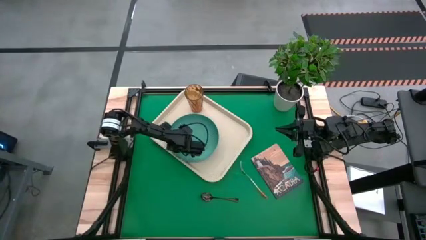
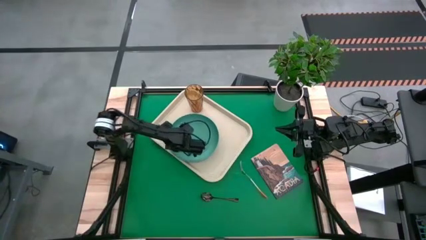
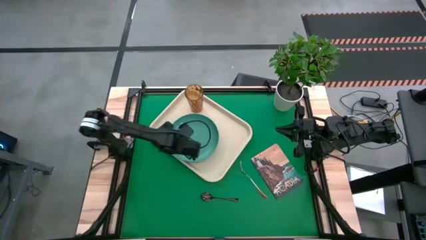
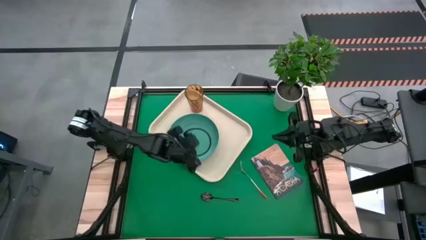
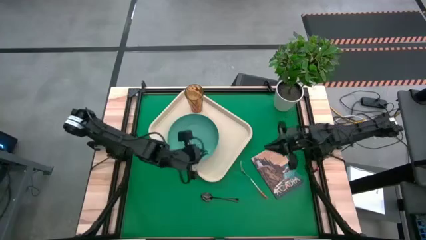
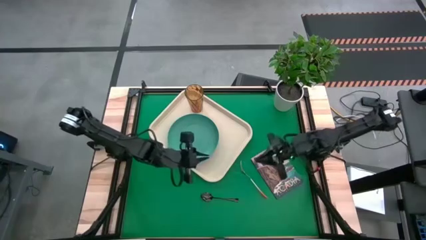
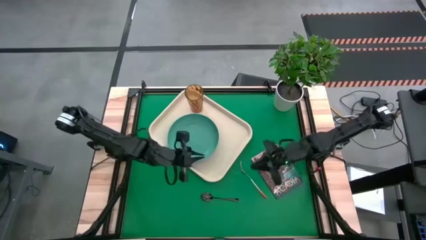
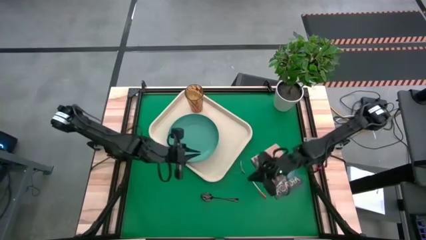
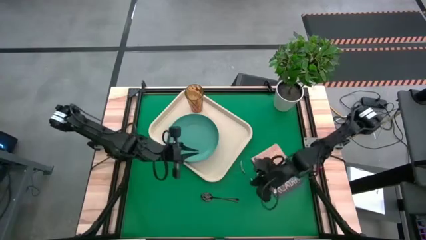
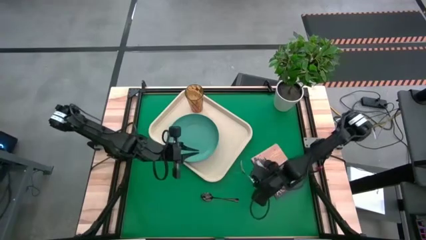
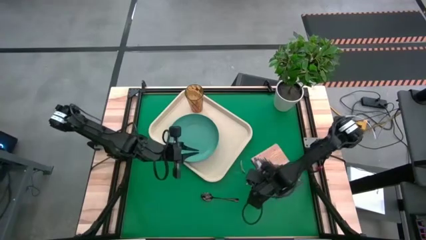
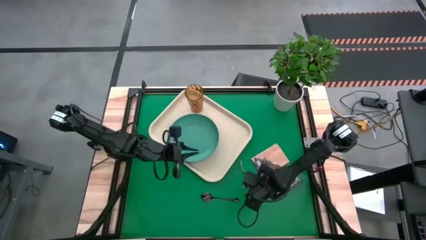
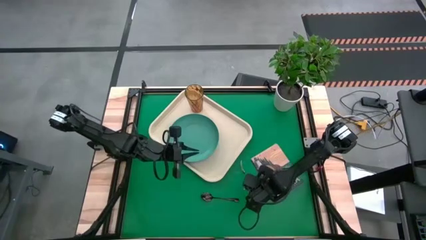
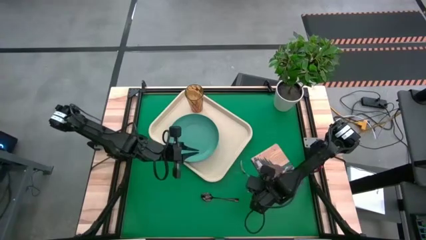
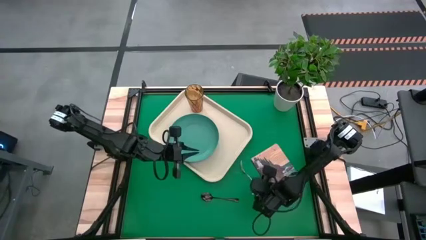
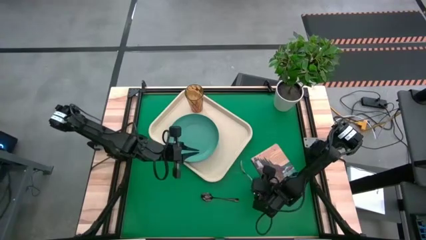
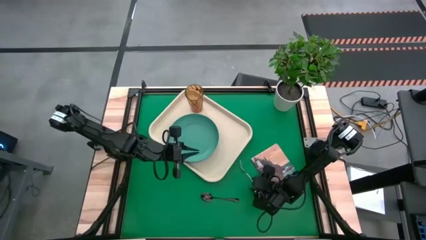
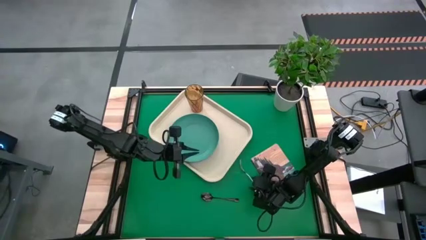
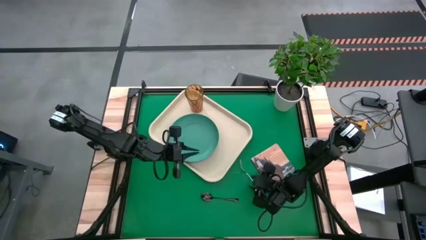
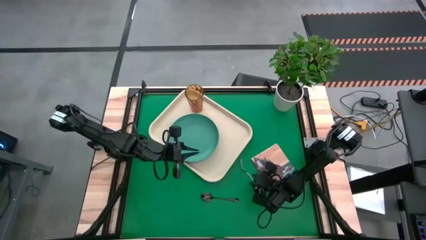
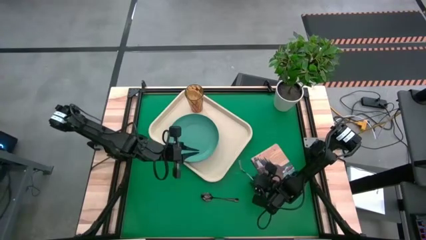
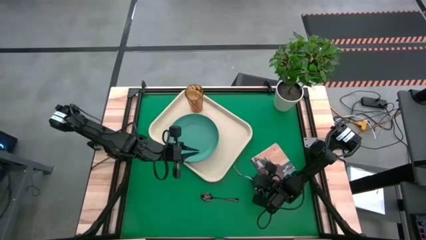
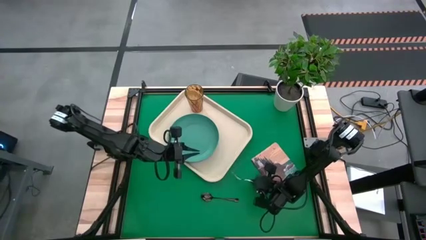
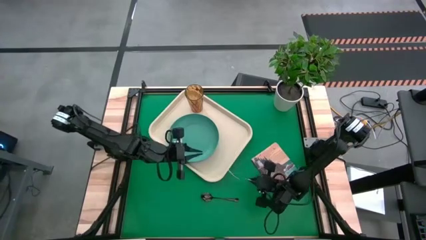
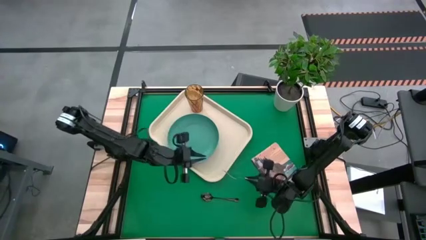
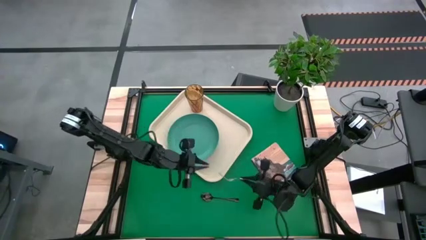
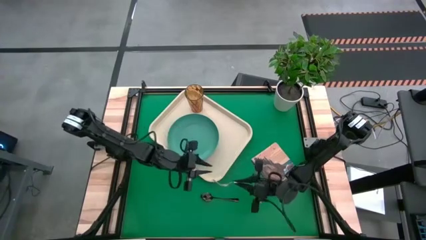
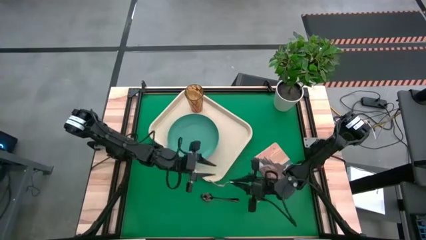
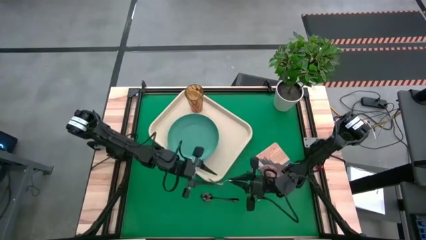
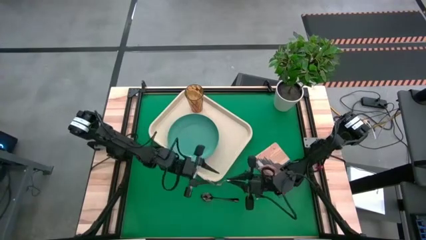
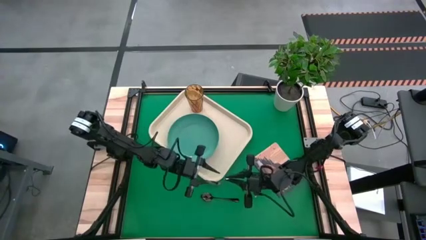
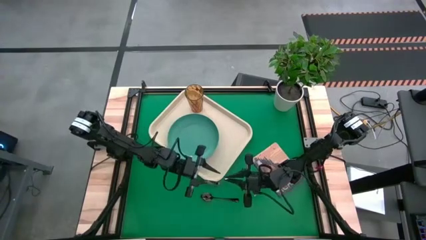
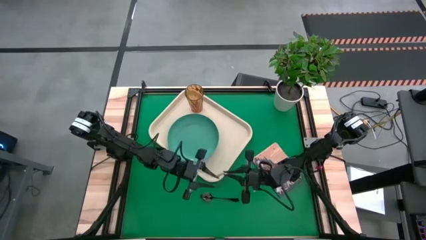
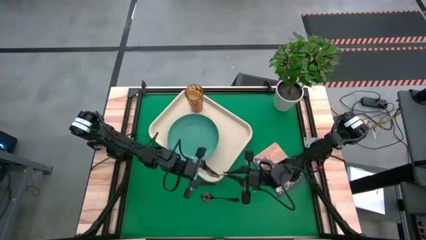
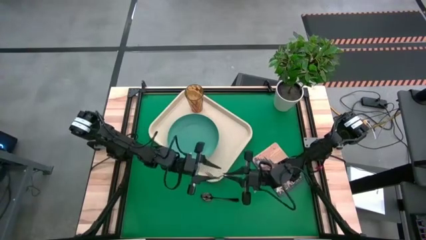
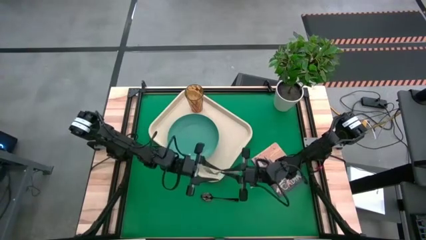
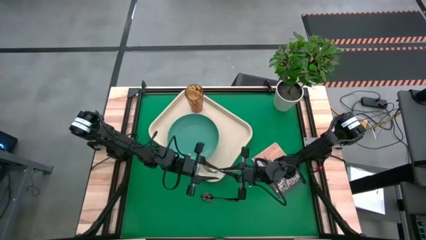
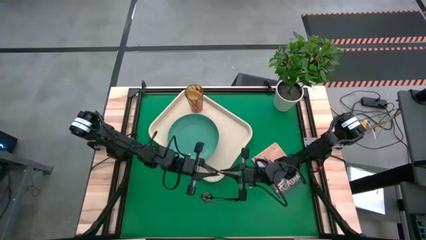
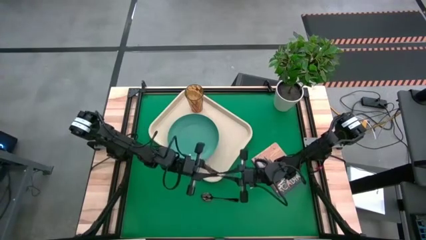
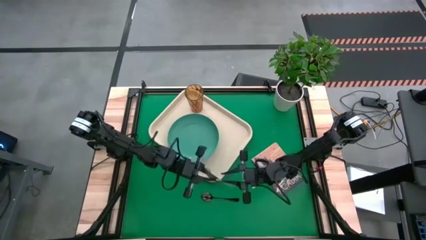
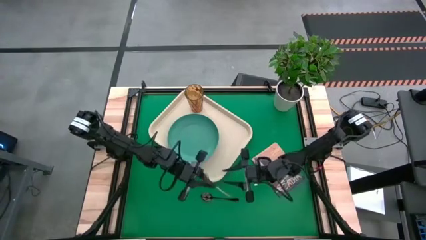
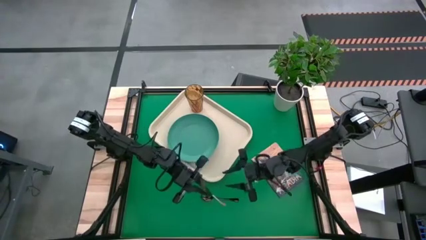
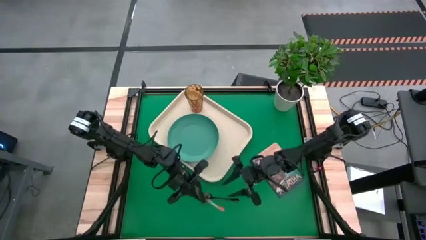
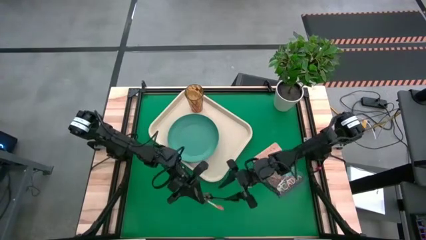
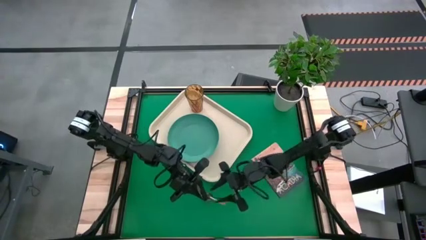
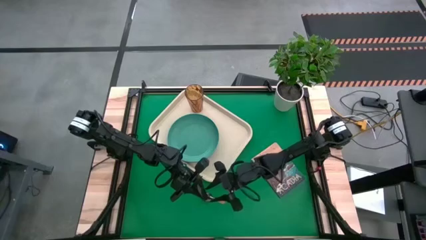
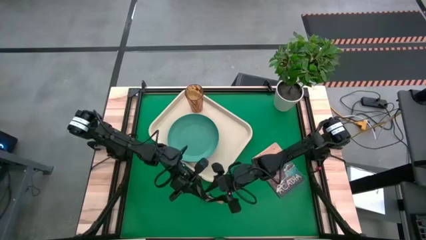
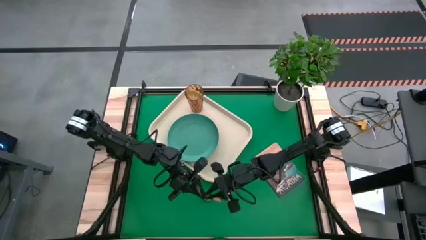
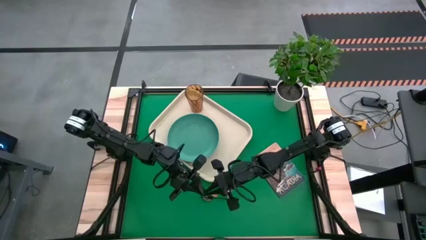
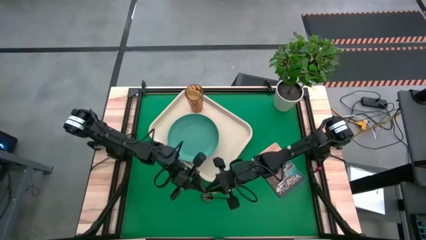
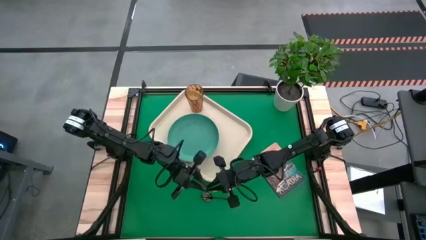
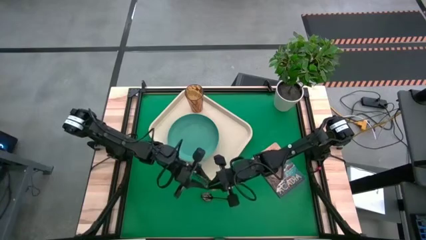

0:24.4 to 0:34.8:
Task: Pick and place plate/cup/fork/spoon on tray
Put the orange fork on the white tray to the right of the green plate
